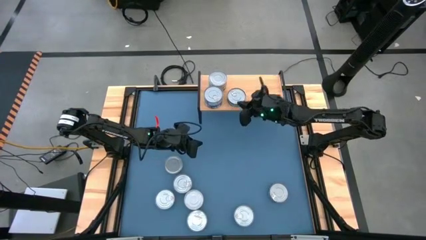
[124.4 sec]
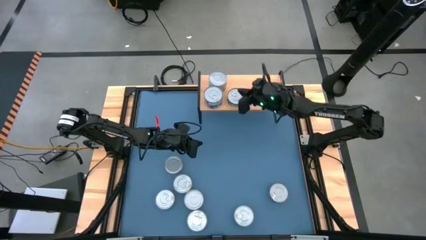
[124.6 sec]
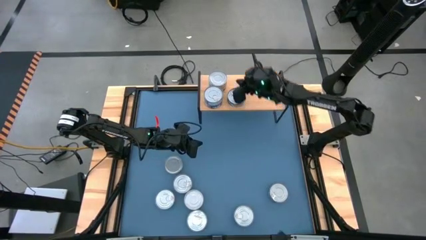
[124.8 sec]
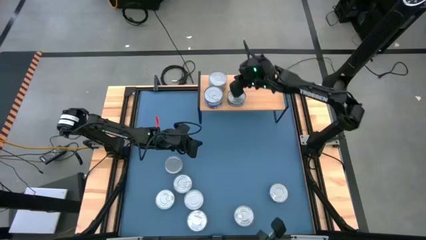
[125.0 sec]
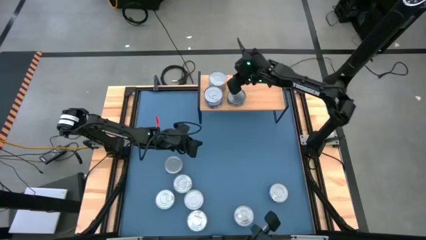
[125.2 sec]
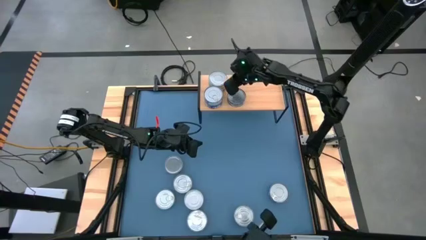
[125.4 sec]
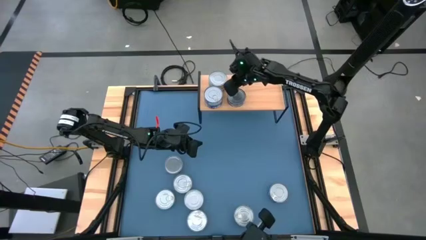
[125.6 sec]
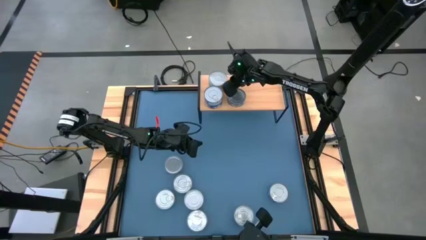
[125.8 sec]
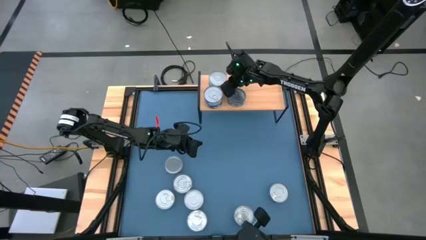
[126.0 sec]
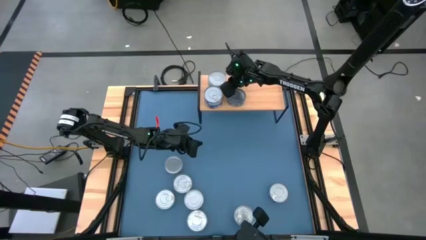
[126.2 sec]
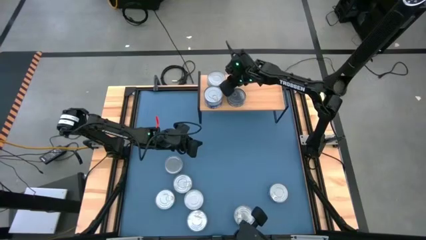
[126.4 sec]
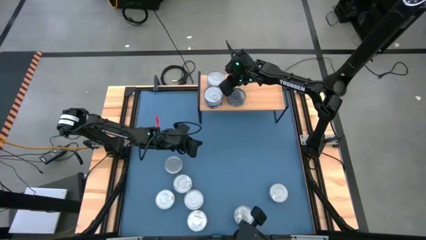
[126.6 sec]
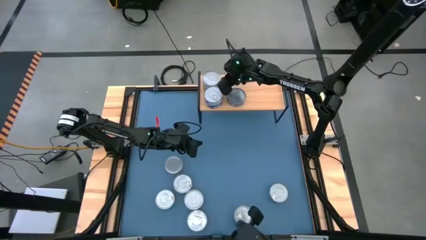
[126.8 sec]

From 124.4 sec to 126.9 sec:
Task: Stack canned seafood by type on shelf
Adjust the green tuna can on the shelf

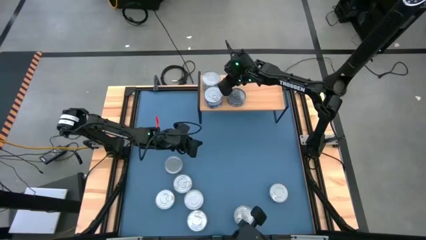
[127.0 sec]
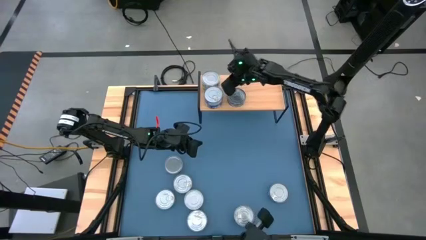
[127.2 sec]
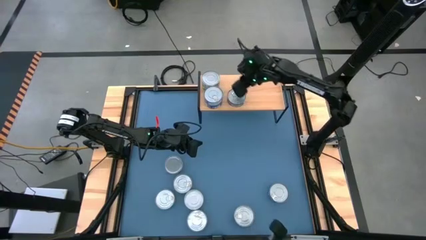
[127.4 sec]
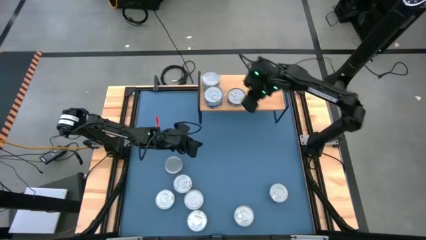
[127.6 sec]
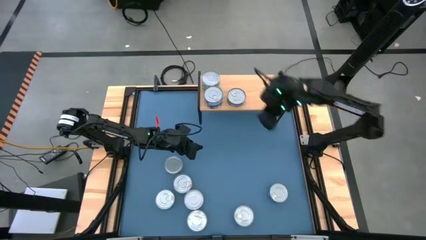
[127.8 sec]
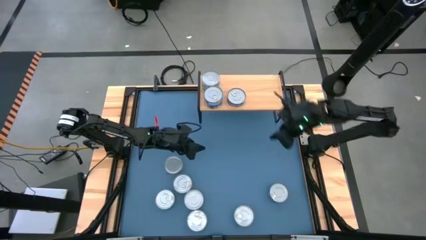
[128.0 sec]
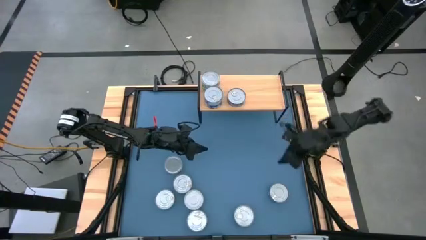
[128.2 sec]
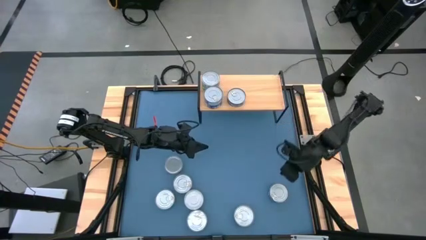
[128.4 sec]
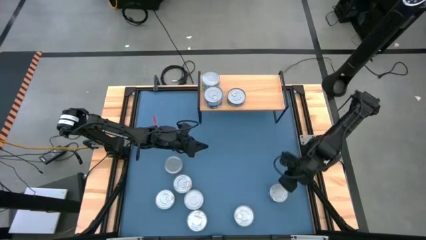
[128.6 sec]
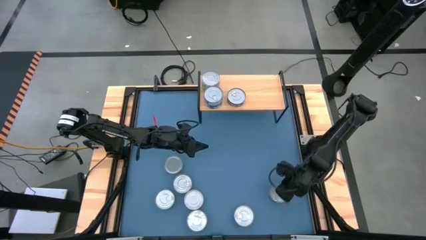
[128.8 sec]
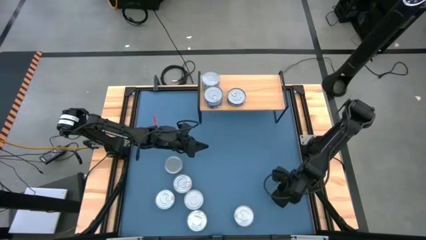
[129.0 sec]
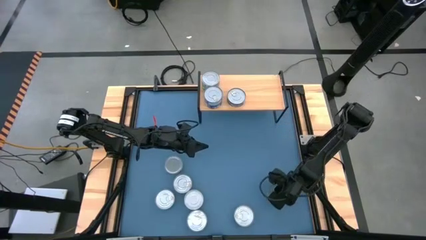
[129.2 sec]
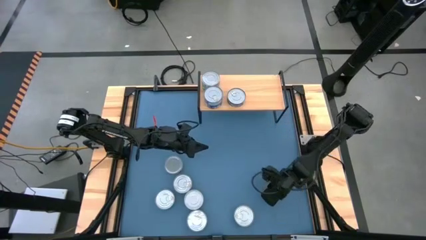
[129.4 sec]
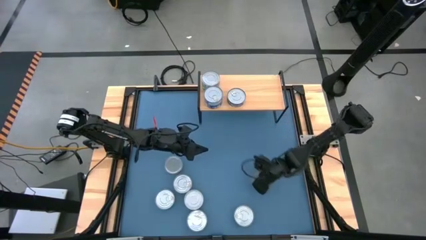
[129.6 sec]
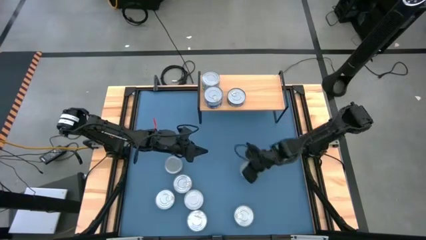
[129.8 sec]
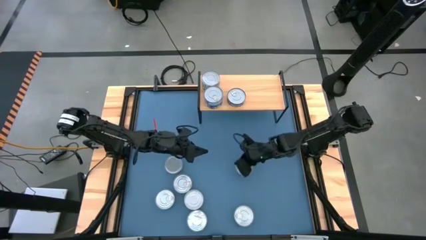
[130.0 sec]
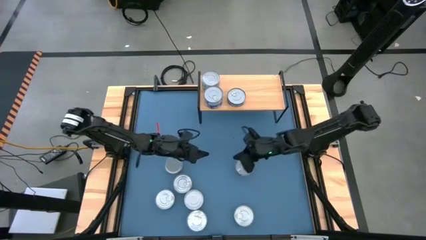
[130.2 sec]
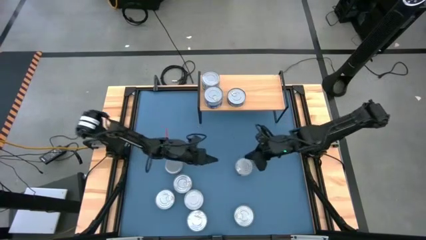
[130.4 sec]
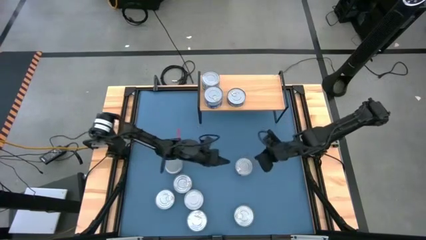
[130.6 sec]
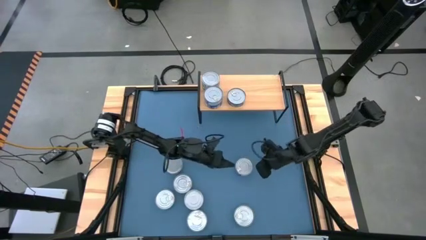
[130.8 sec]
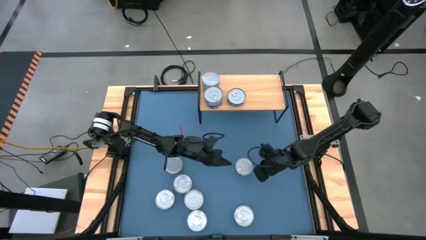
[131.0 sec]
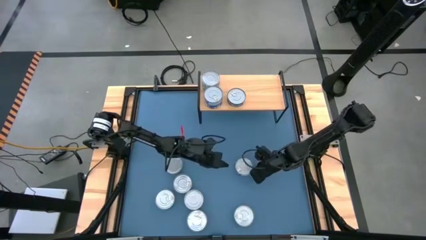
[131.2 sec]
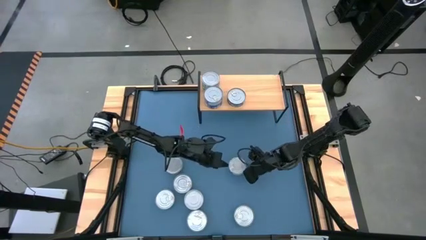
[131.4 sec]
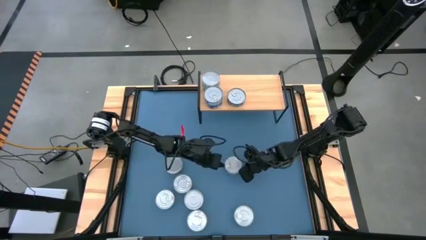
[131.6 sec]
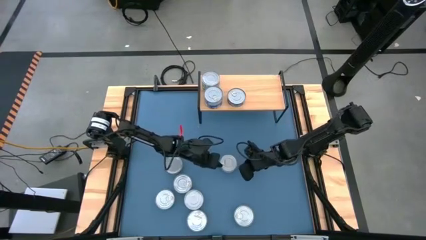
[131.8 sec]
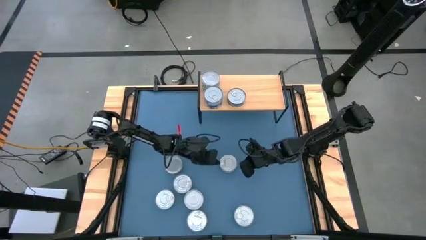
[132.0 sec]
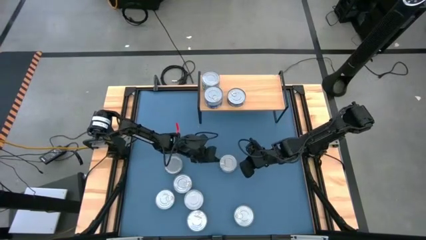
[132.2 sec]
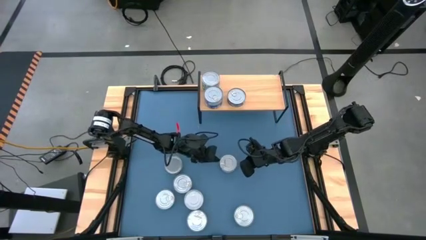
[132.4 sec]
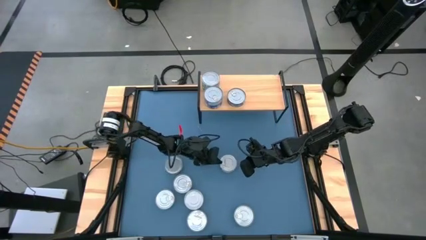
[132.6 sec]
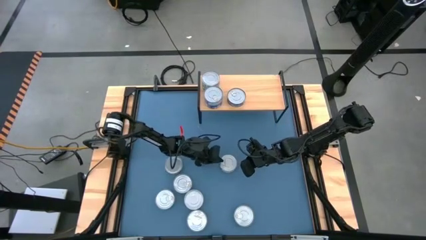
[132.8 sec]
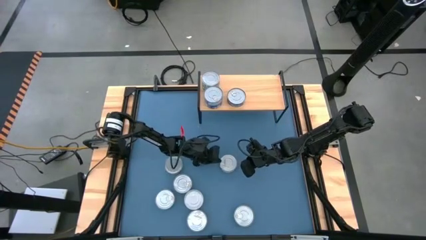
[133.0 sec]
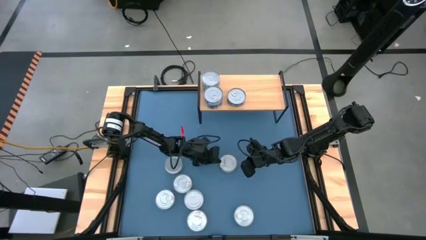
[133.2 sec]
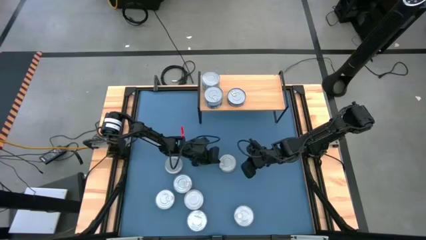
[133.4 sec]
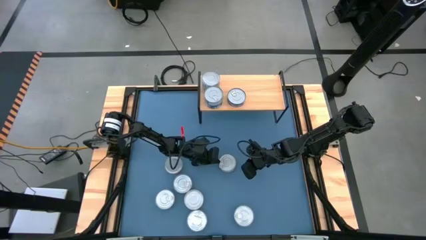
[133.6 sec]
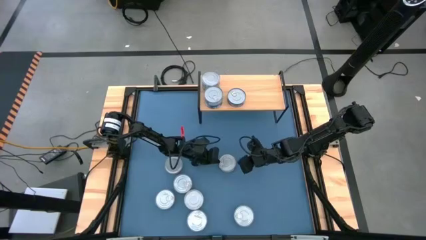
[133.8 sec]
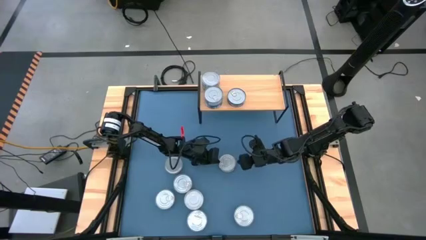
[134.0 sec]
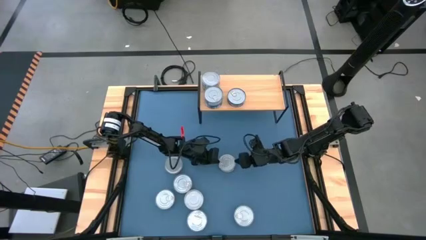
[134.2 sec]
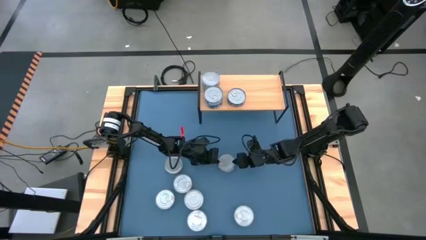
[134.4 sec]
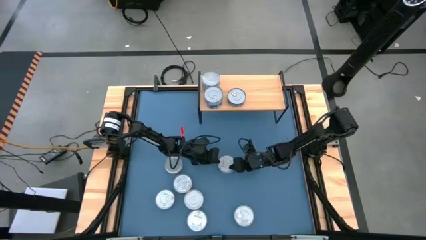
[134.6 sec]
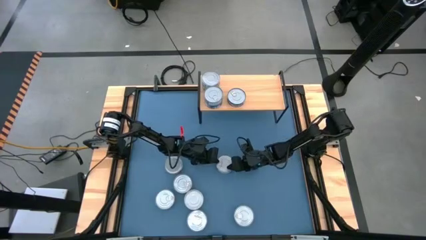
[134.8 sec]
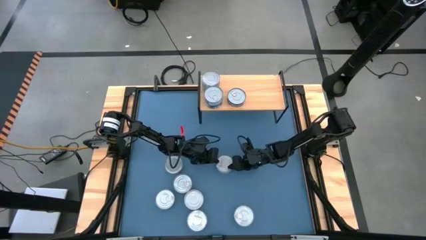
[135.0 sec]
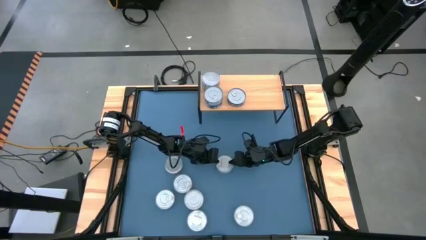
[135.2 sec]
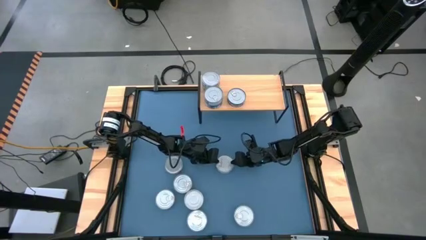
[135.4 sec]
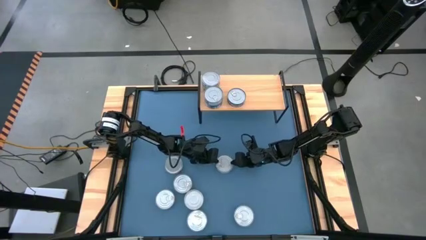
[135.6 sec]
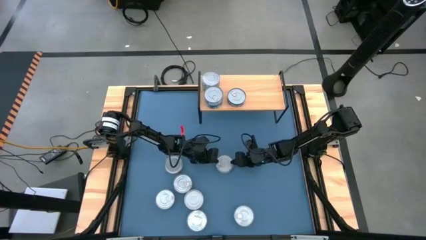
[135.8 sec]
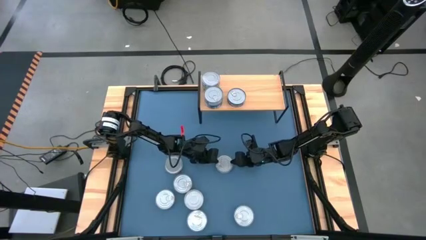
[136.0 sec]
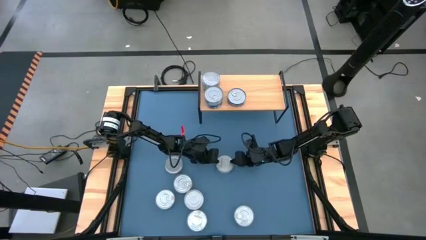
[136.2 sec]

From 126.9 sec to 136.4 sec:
Stack the blue tuna can on top of the blue tuna can on the shelf

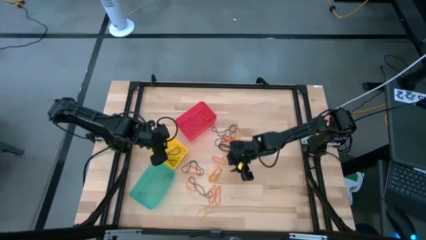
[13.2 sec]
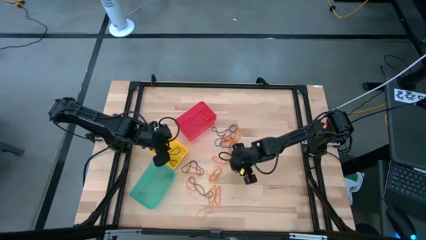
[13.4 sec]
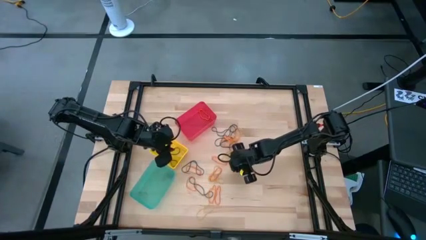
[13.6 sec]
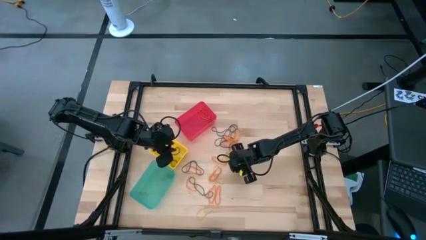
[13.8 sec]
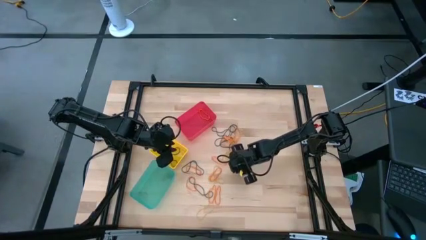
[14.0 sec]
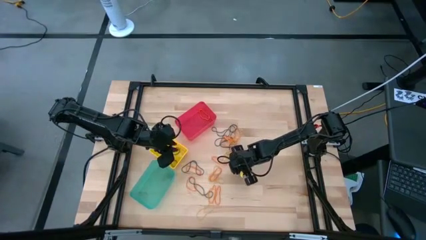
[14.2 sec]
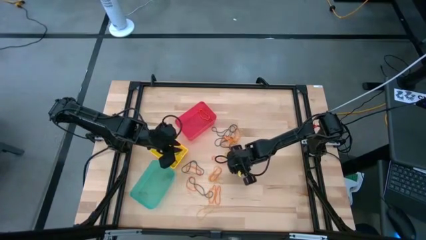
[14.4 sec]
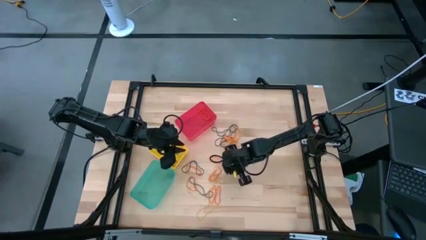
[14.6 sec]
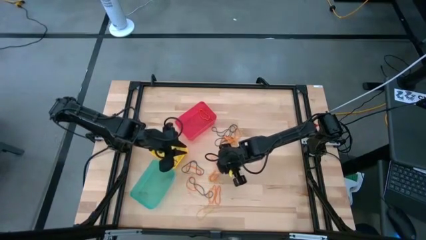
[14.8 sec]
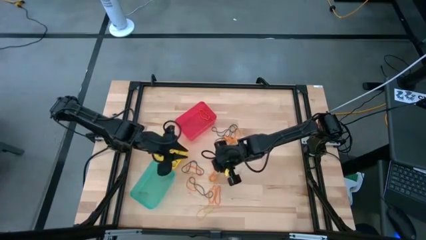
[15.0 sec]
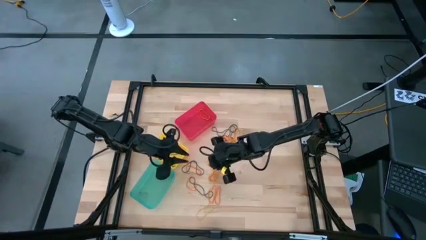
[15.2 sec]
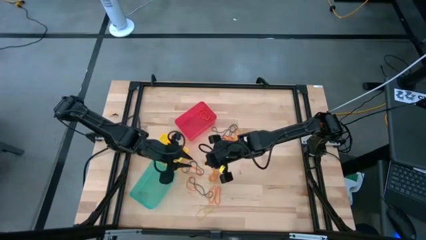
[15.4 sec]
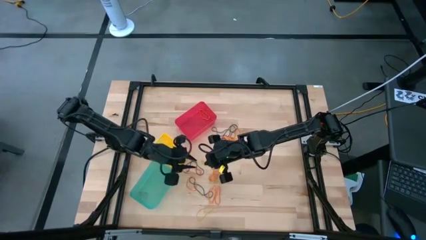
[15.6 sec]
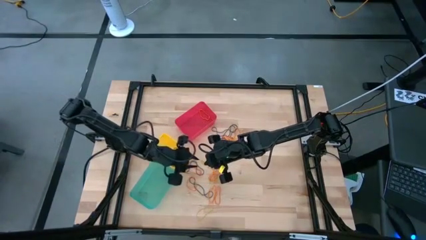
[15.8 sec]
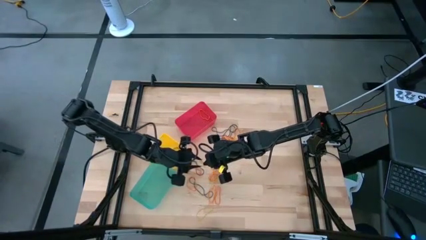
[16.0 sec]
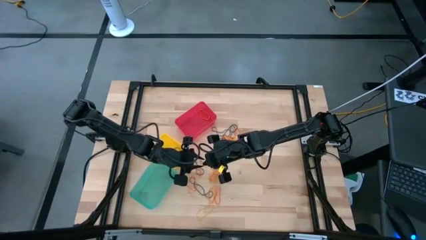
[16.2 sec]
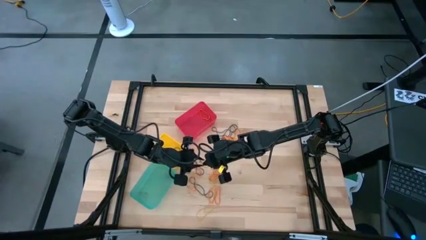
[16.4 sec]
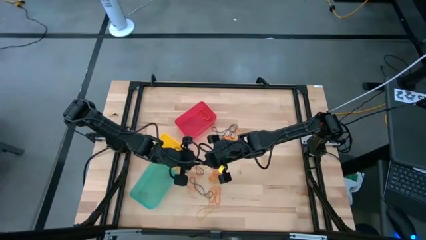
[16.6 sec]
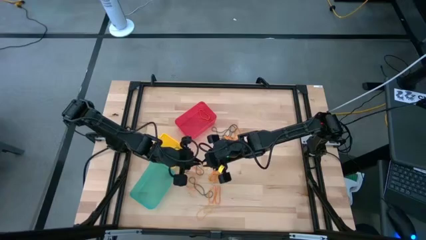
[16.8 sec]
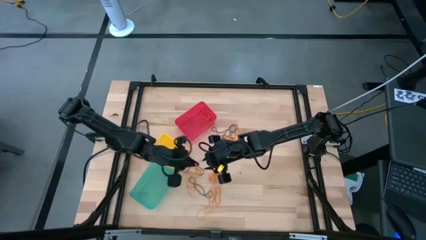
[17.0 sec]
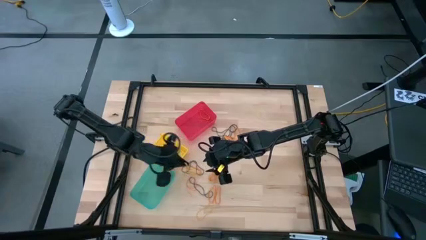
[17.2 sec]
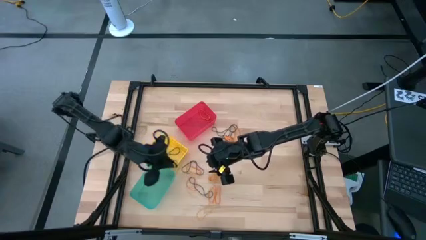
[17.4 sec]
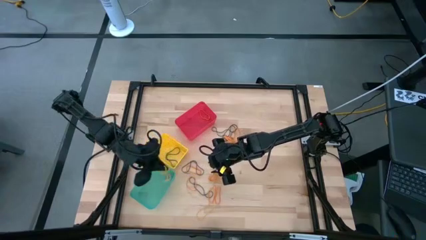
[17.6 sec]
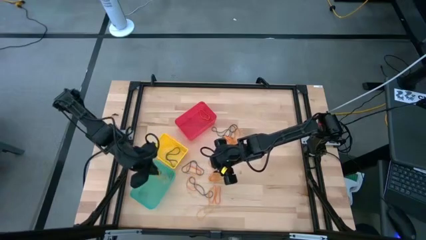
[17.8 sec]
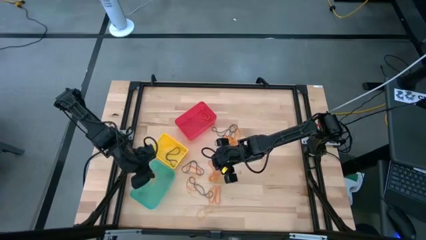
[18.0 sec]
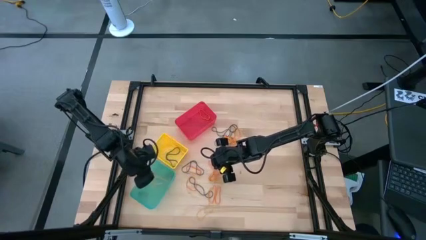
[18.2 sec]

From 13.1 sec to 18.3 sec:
Task: Sort rubber bands into baskets
Put the yellow rubber band into the light blue bin
